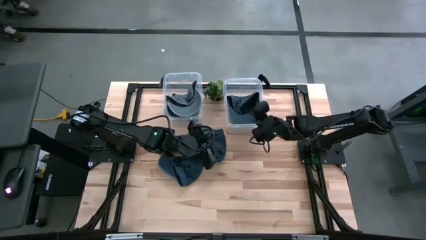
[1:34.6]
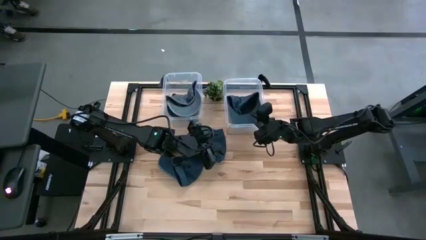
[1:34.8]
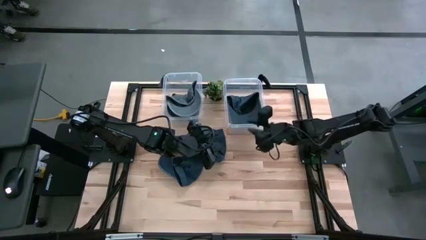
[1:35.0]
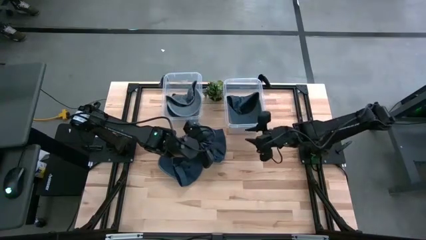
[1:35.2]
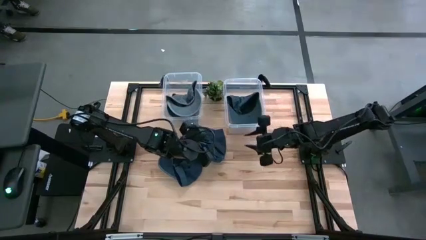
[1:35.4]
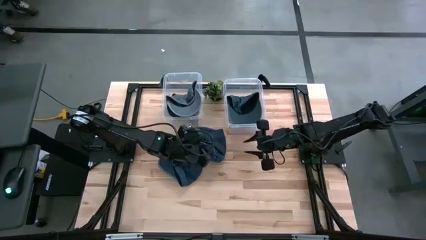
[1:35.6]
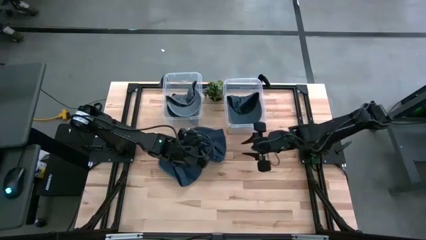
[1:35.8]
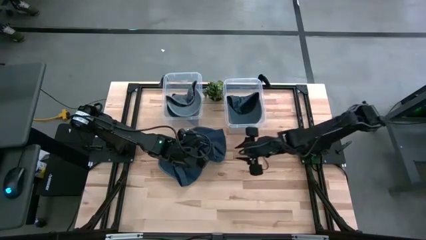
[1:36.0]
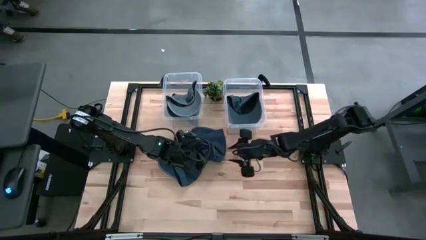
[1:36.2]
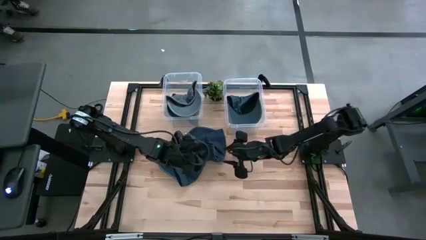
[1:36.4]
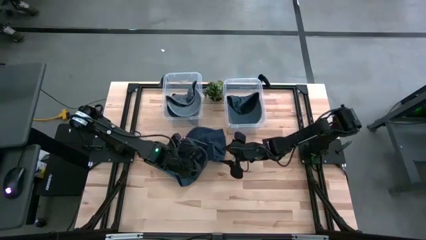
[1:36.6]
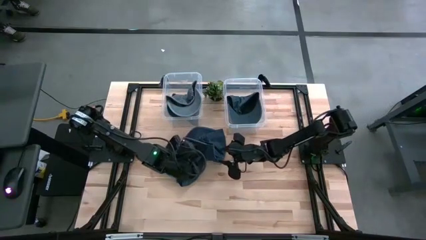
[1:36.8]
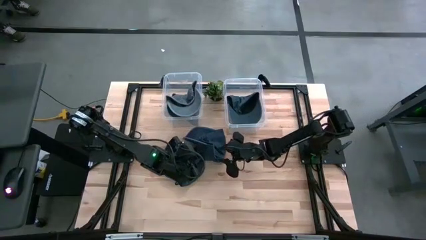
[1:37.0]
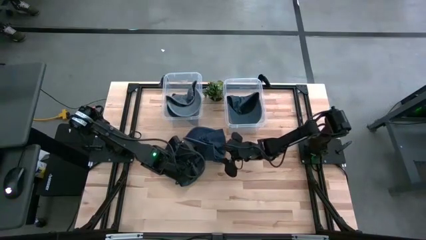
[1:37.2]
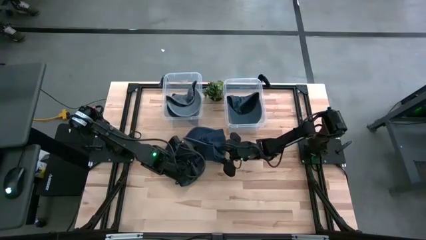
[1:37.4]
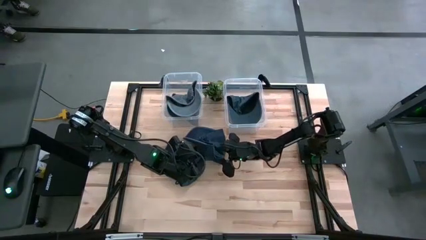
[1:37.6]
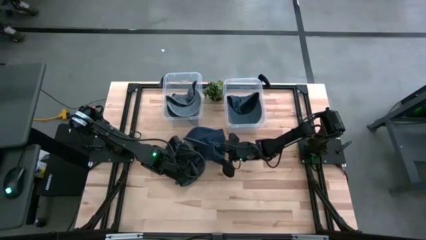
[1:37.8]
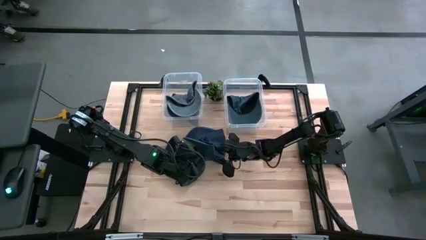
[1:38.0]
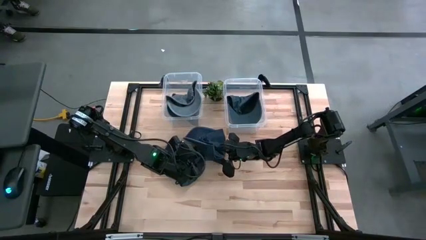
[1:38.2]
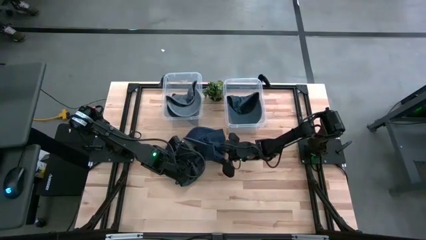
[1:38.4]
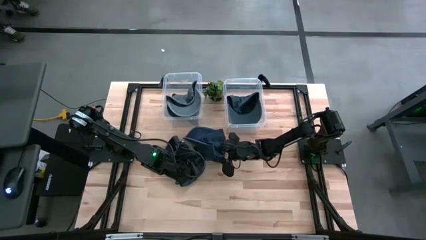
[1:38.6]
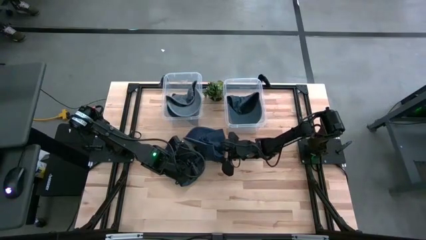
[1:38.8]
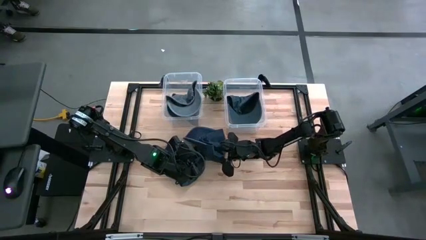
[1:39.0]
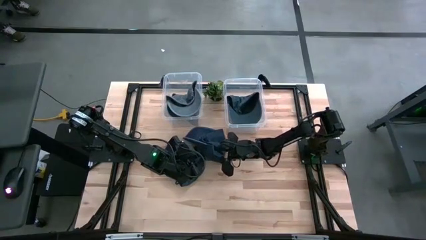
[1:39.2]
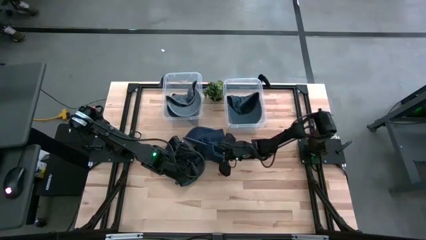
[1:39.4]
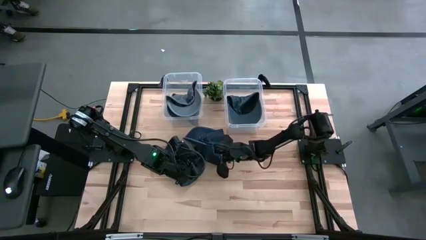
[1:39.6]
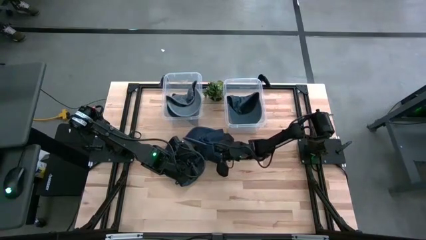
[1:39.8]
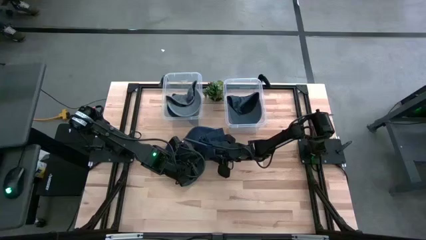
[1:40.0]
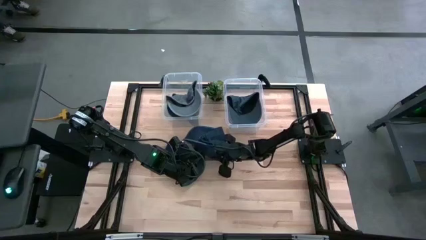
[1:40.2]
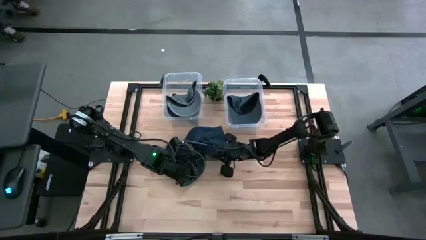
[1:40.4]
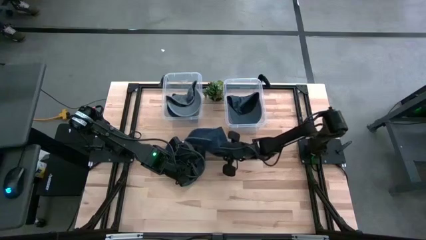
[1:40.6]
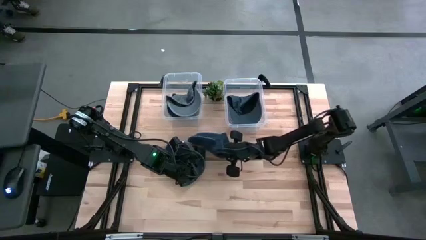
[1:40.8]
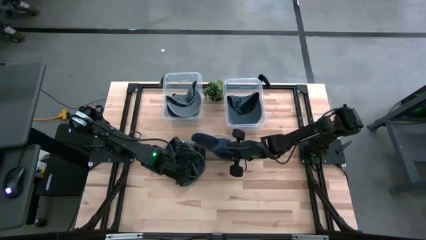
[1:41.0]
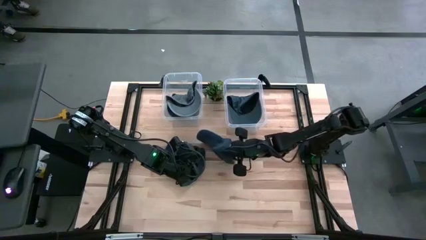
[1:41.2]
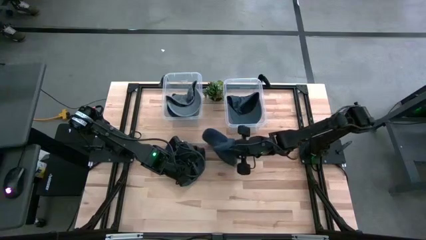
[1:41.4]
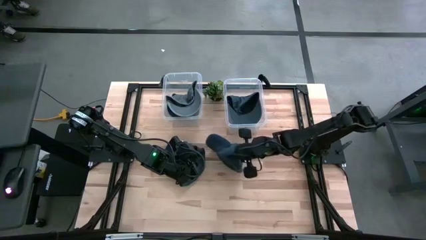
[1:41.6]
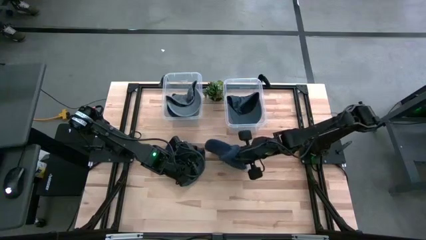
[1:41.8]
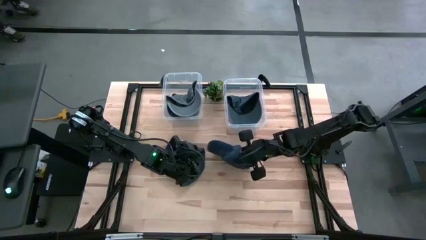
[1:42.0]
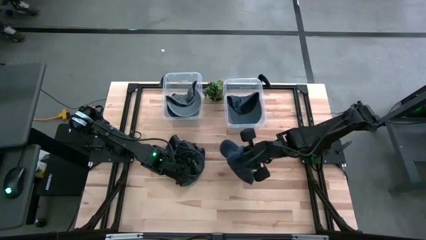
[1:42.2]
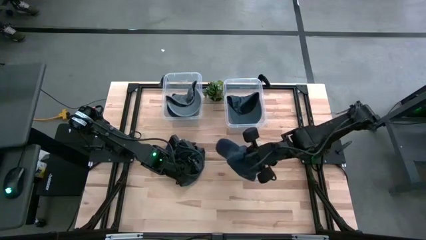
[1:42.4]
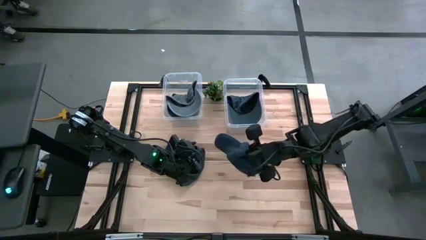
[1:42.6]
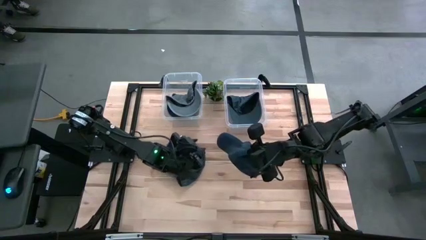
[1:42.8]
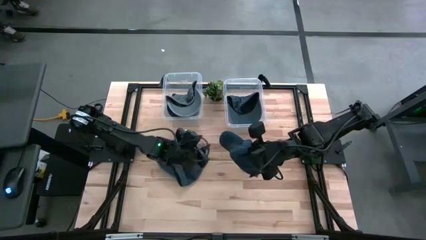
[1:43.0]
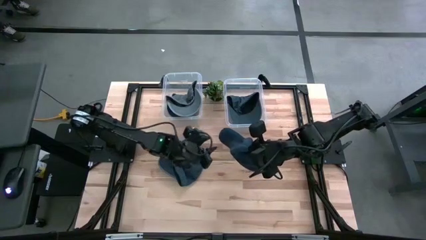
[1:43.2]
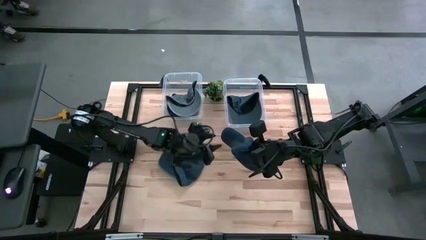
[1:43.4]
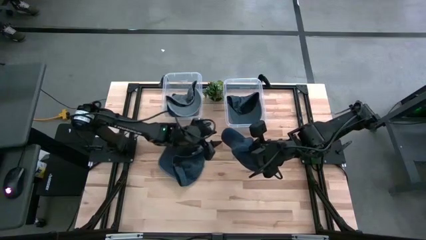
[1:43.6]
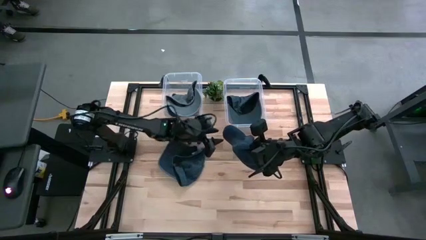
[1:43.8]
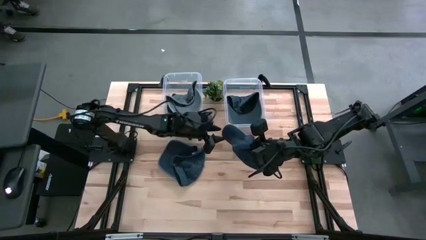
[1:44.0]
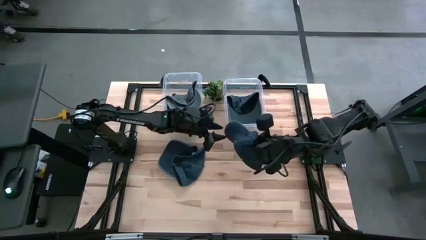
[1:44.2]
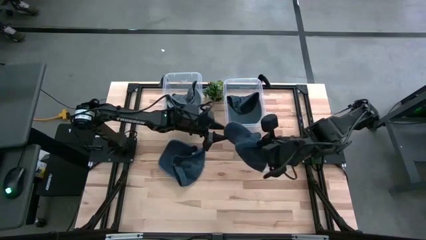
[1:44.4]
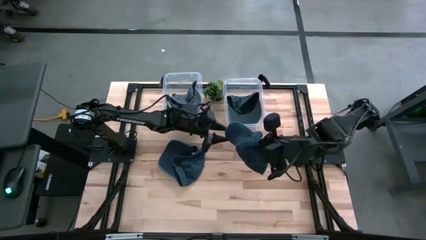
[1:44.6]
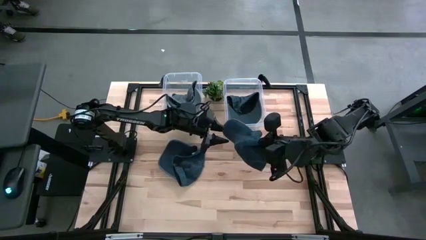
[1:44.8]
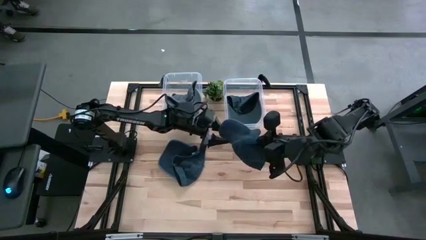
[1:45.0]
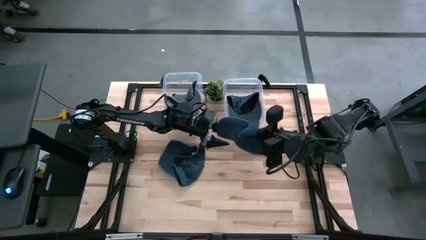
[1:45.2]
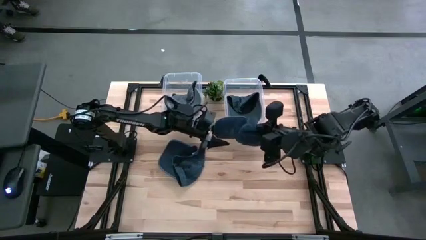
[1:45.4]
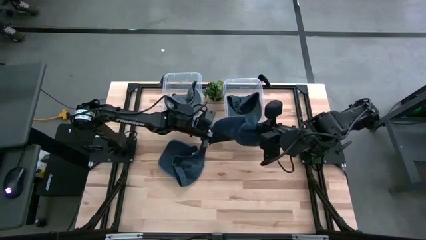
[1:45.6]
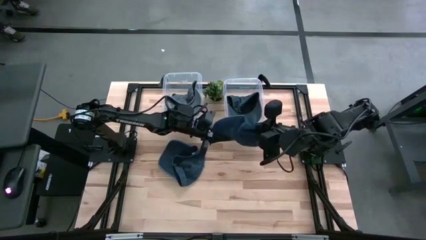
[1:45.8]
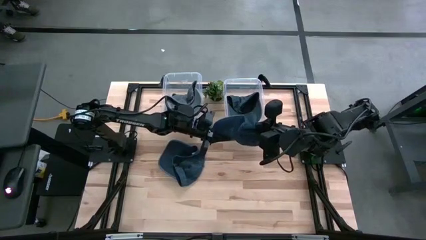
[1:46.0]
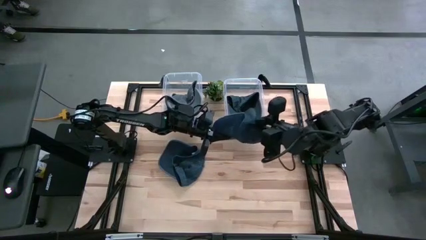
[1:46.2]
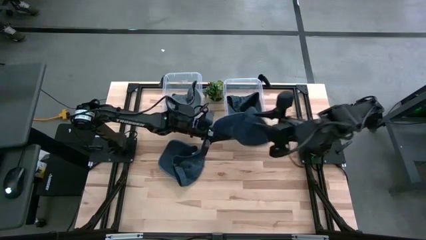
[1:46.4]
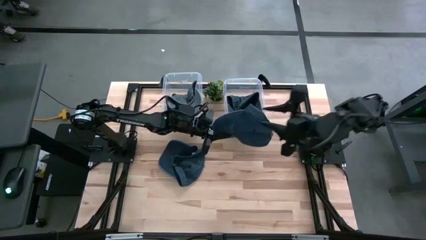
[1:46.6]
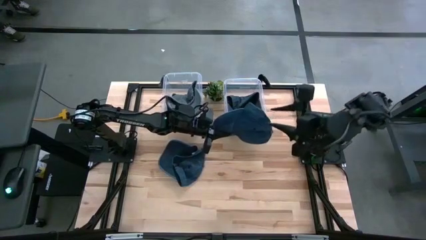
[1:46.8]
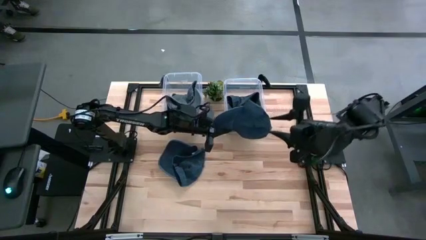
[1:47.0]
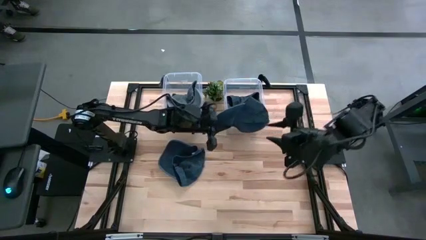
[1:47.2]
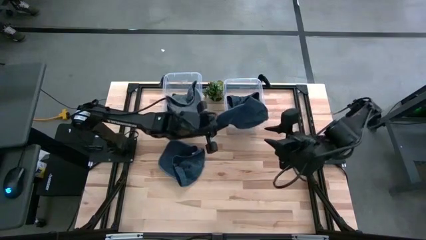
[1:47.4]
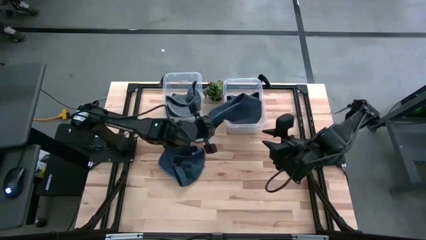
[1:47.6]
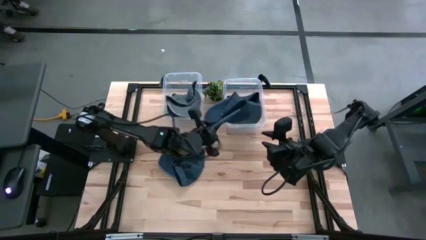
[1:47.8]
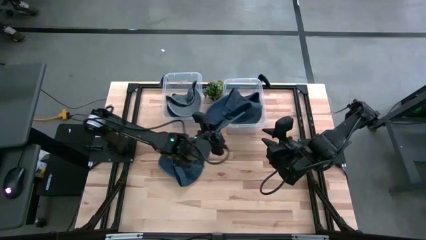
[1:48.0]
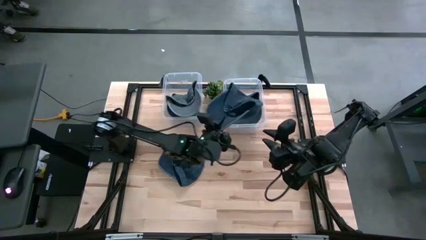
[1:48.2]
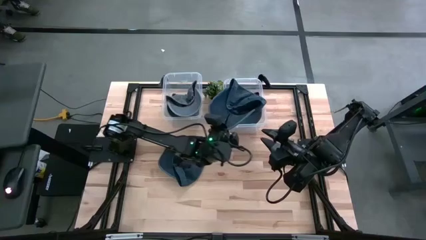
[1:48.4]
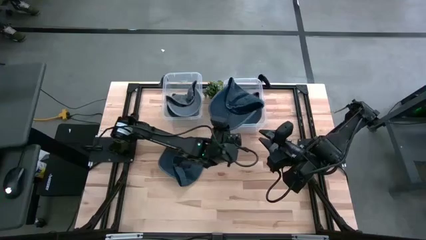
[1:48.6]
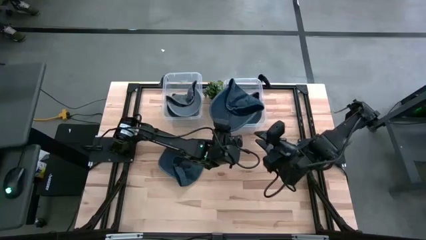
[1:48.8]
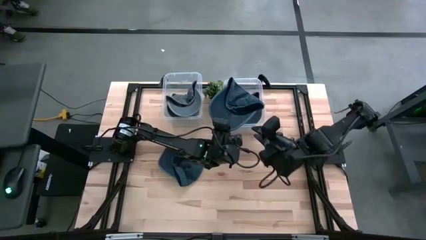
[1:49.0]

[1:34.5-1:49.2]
Task: Pick & Place hat
Put the top blue cap into the right transparent bin

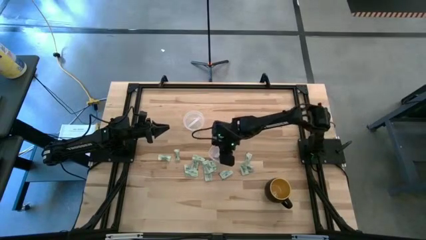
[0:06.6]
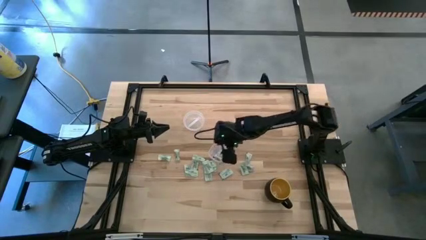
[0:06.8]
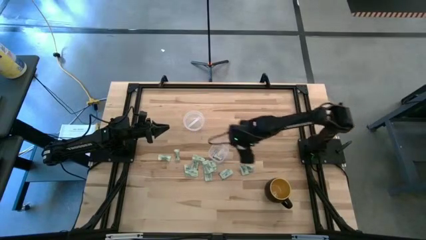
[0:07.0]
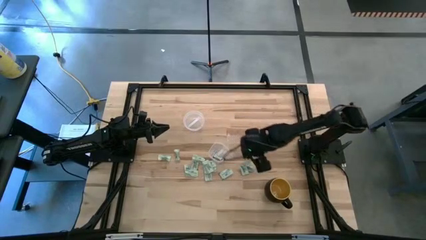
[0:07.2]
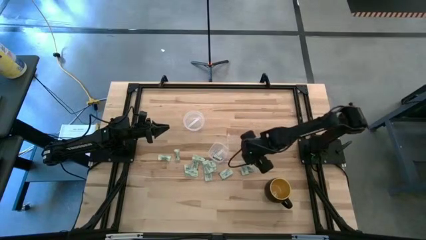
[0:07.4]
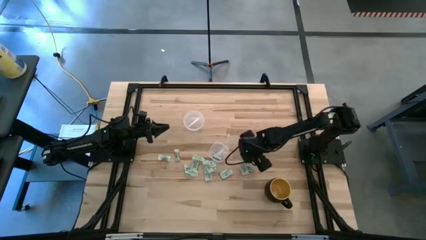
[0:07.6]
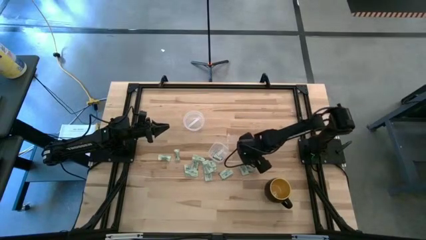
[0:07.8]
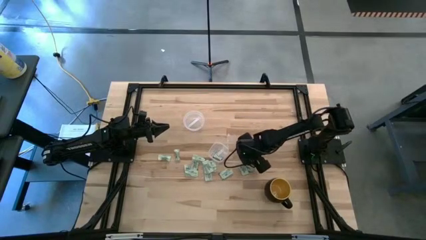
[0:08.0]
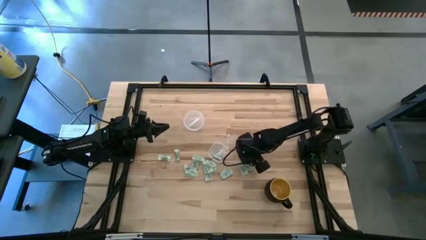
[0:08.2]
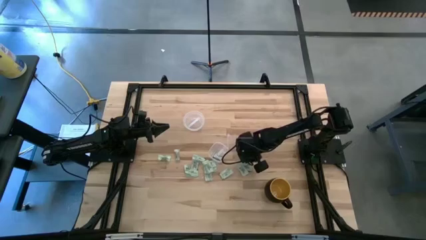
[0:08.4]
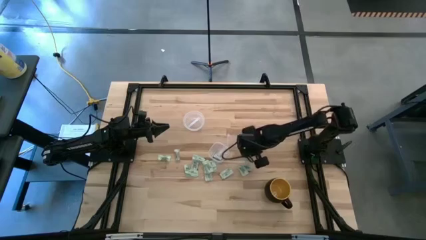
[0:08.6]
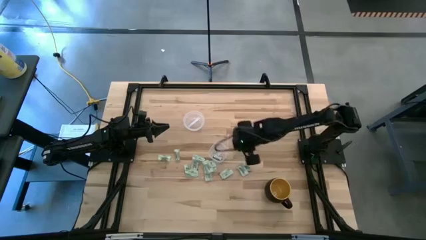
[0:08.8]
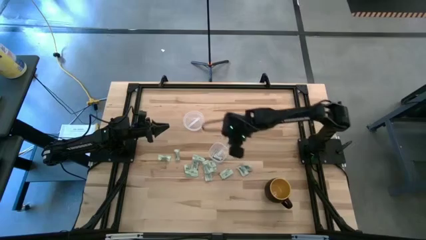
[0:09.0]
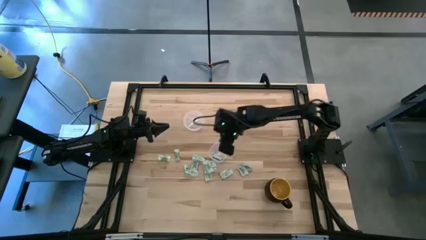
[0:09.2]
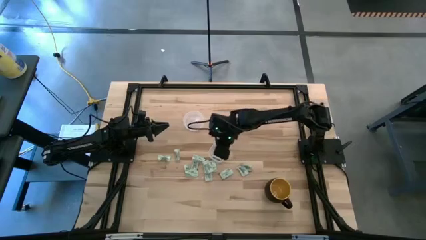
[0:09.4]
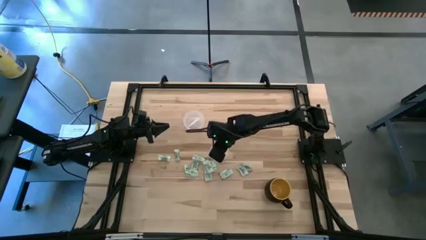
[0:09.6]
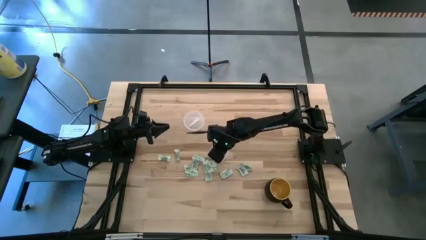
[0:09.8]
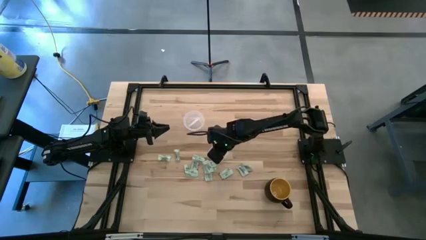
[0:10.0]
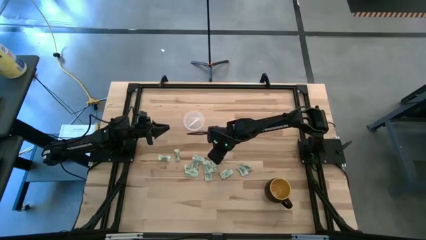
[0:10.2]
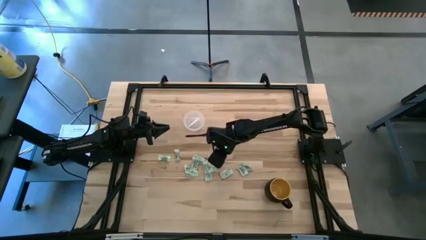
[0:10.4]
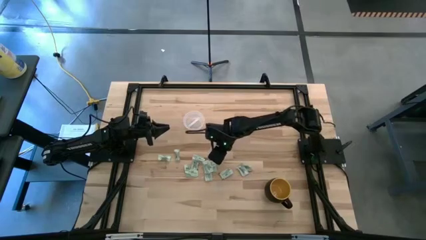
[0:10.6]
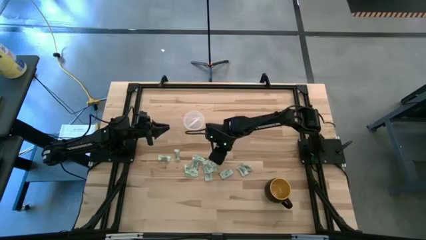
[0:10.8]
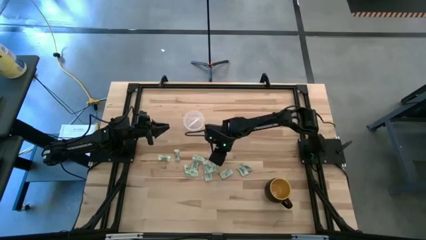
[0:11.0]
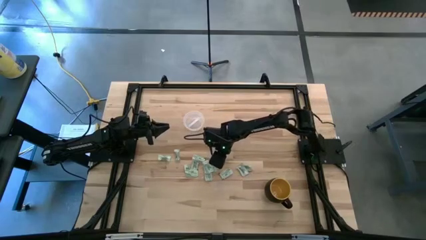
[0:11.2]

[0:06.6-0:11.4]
Task: Pick and place items into bin
Put the light green stevia packet into the transparent bin
